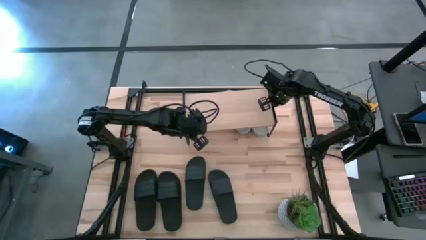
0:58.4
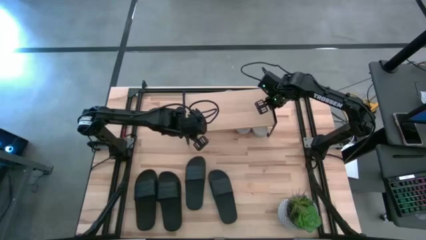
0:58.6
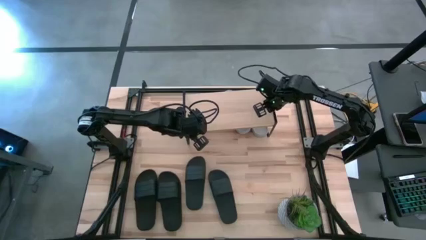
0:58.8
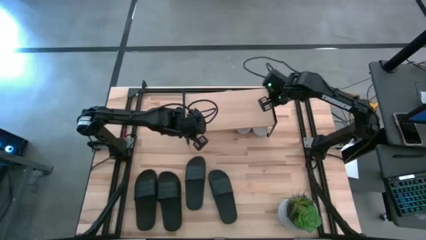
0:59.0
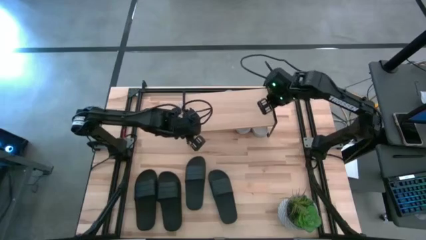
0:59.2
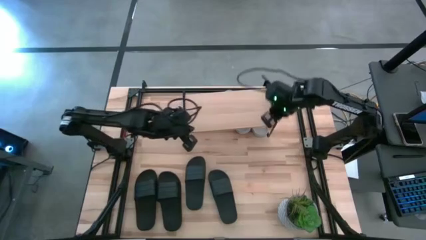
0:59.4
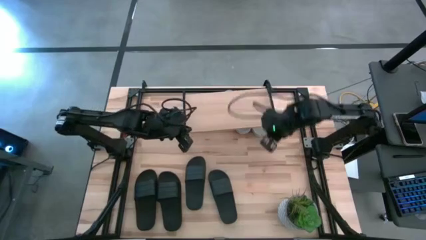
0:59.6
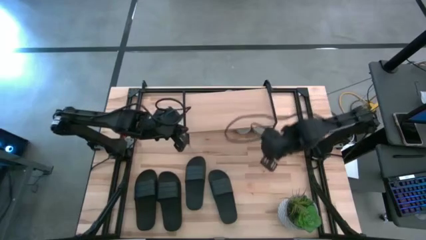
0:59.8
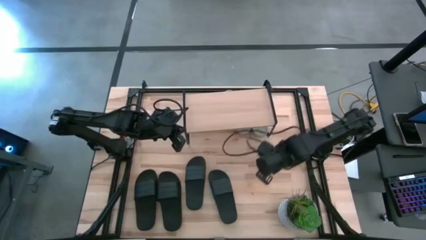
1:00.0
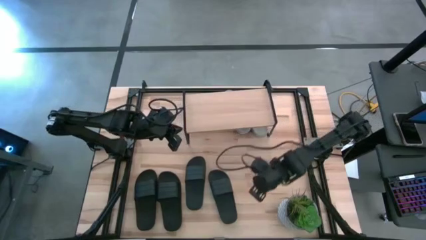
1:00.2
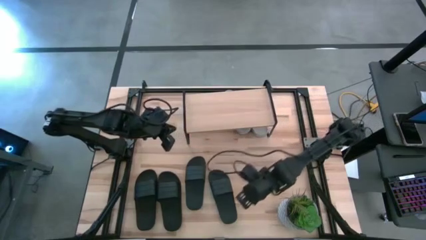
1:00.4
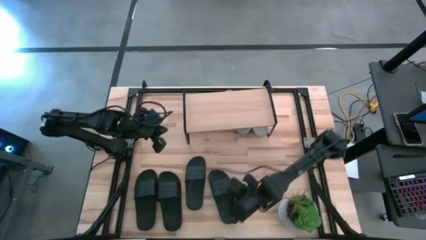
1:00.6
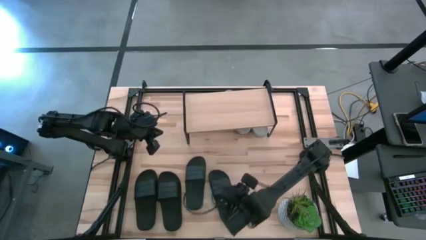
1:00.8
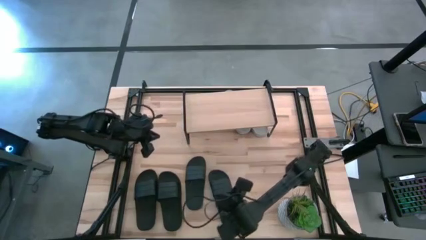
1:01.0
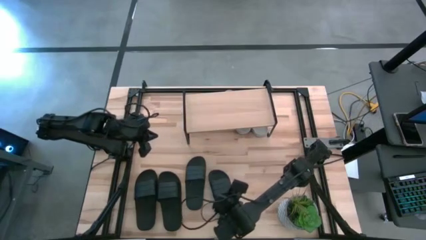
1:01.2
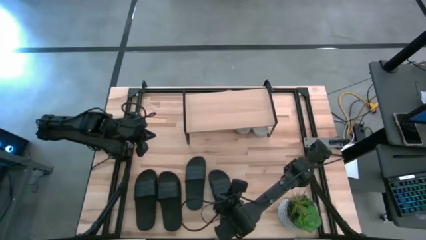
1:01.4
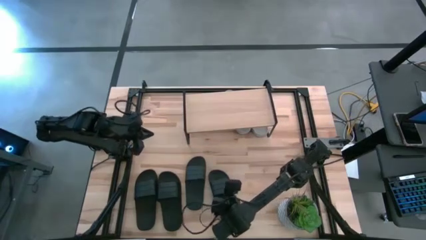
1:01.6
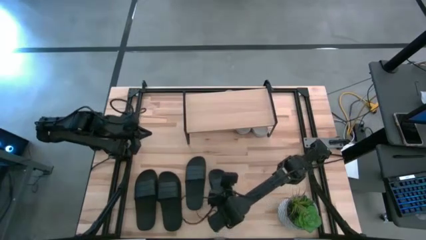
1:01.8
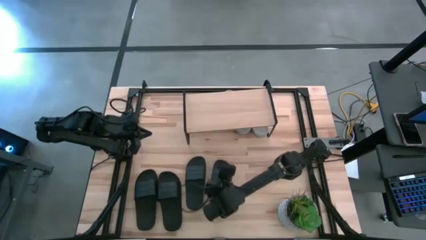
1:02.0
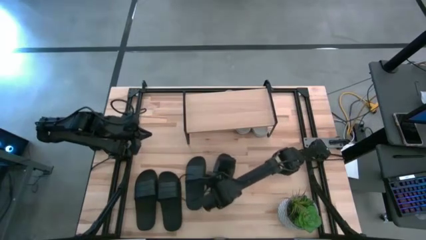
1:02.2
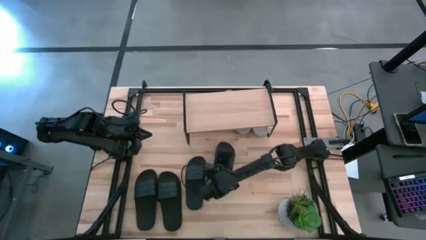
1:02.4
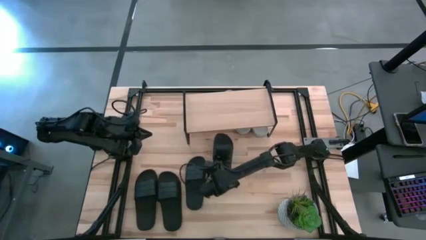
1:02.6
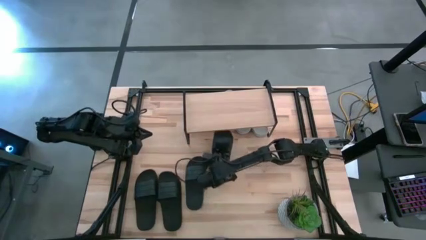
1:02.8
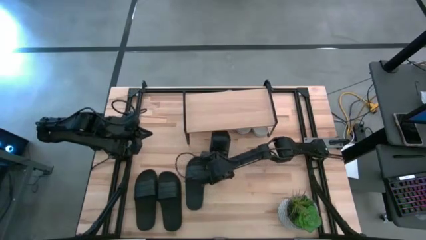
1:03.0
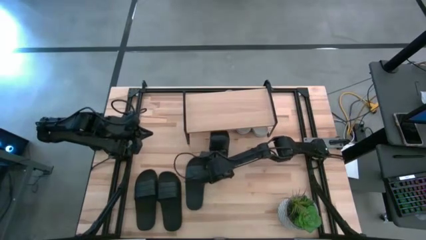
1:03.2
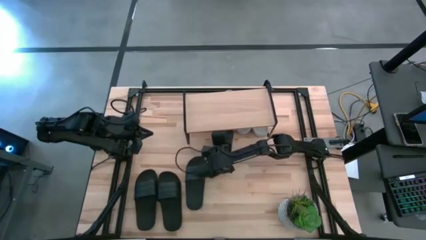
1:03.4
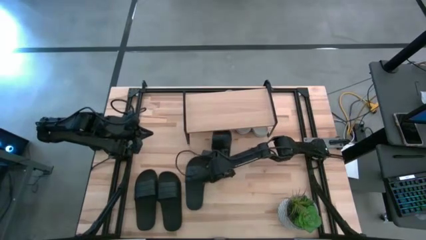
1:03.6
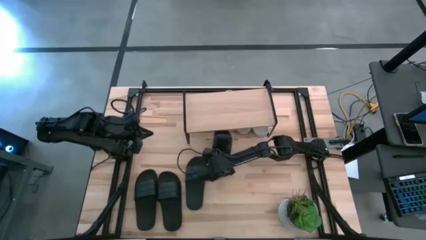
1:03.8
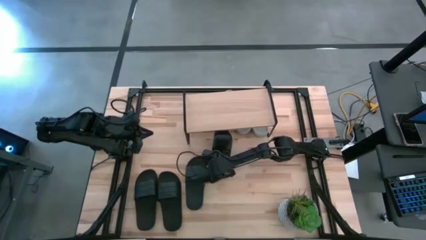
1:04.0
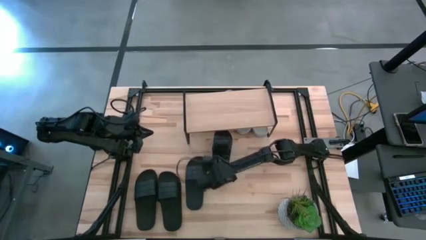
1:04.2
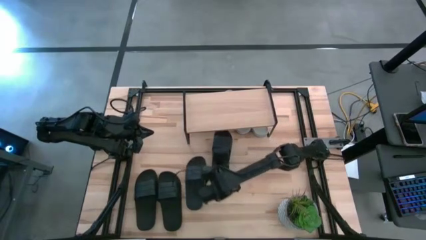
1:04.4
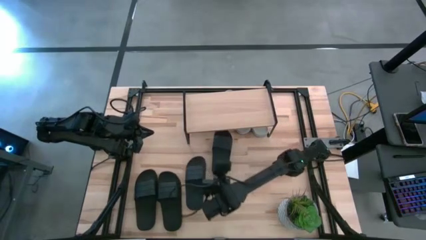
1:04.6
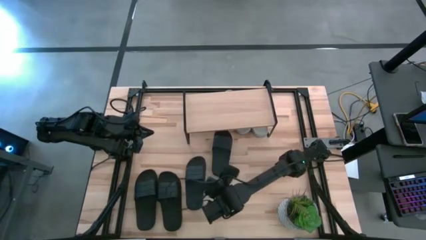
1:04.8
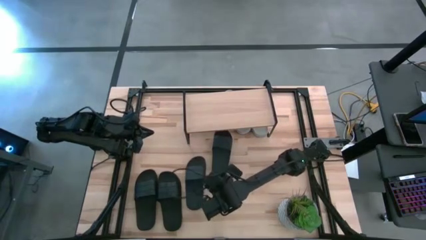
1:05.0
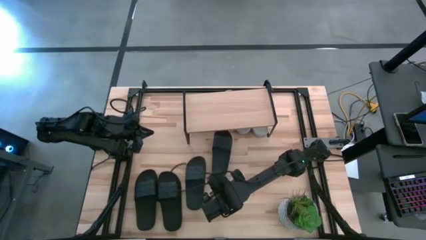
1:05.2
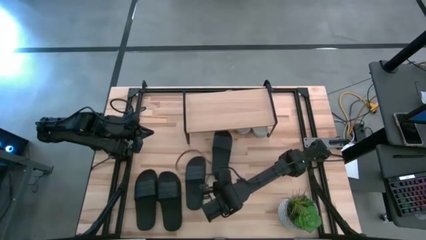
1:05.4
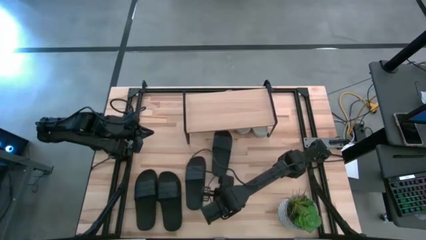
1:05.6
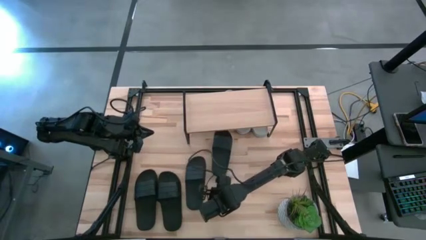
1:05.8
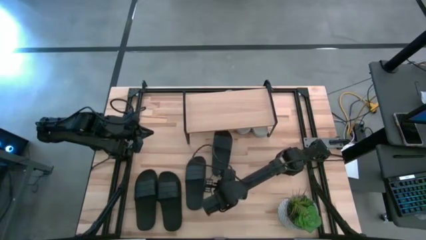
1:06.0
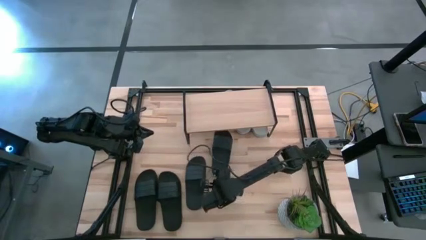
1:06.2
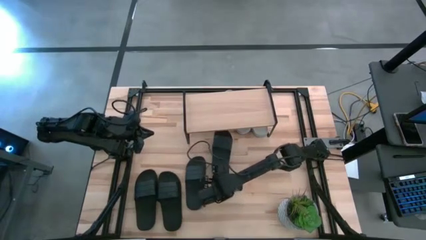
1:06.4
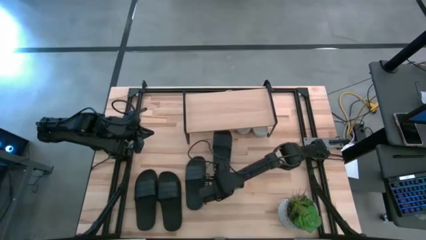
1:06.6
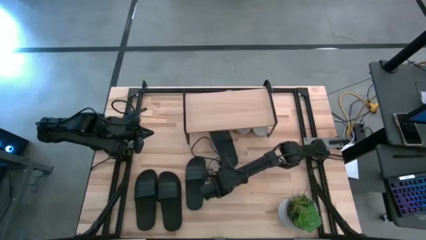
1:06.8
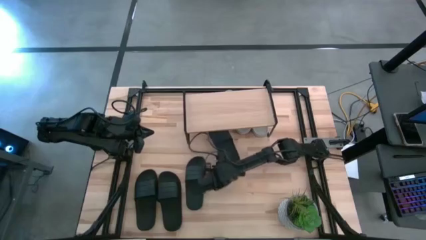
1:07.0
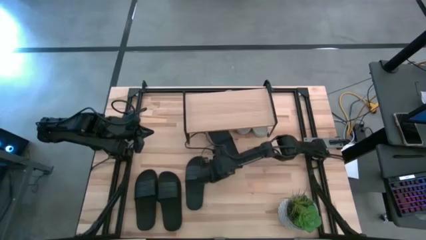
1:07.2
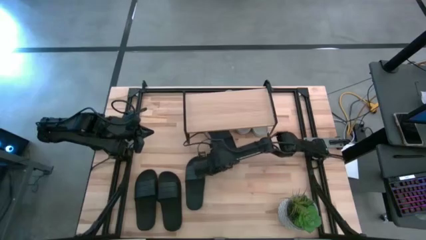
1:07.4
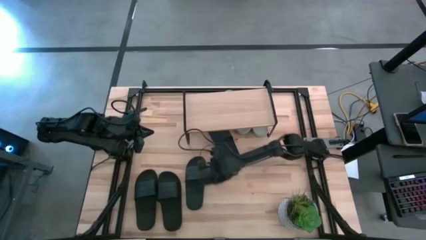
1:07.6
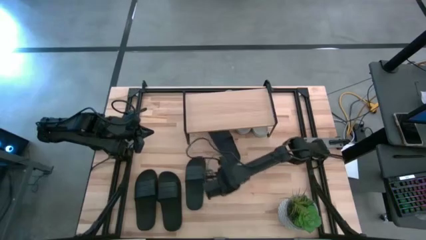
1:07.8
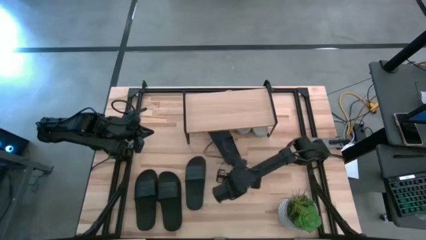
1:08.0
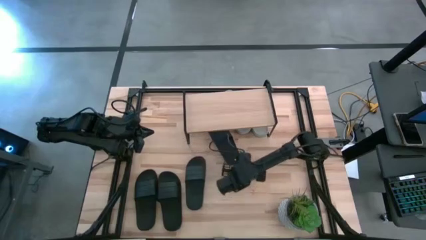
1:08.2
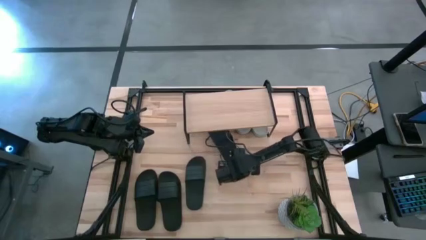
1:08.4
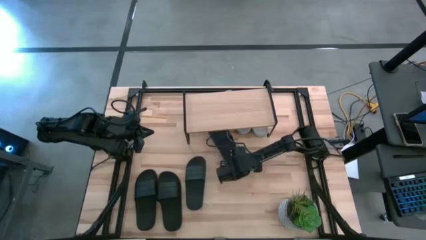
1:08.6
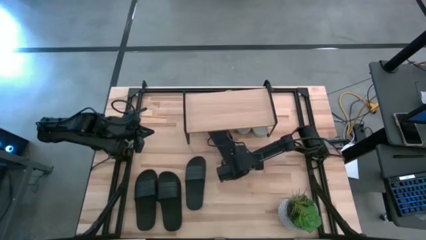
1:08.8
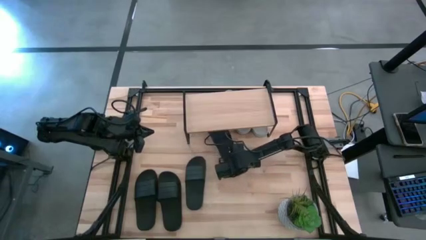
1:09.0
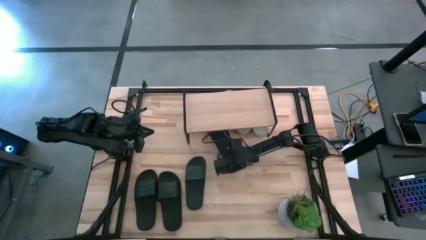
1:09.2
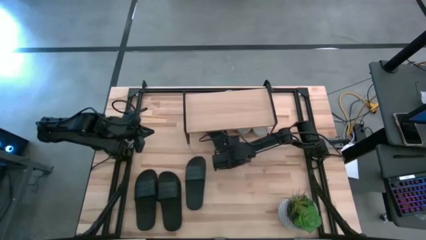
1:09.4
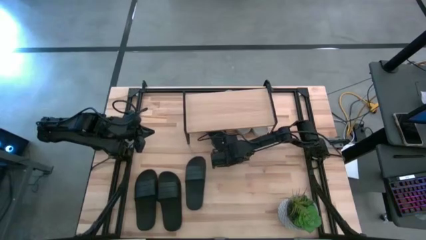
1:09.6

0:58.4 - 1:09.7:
Task: Pick and place slides into the shelf
Put the black slide under the shelf

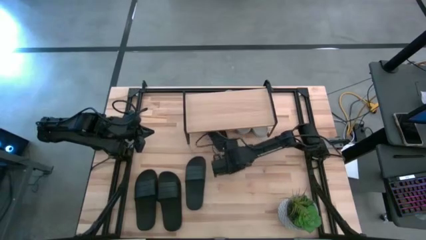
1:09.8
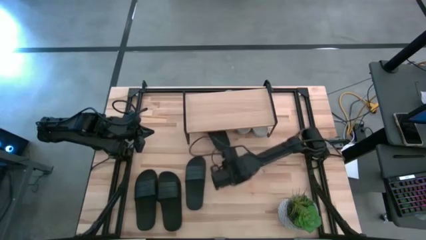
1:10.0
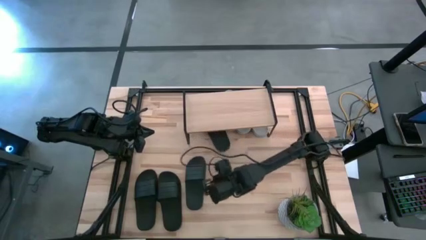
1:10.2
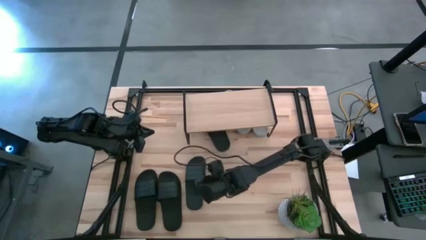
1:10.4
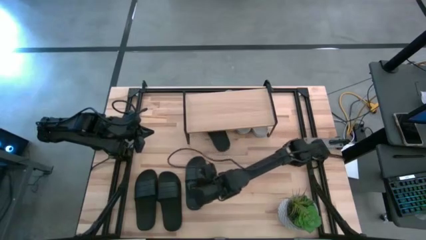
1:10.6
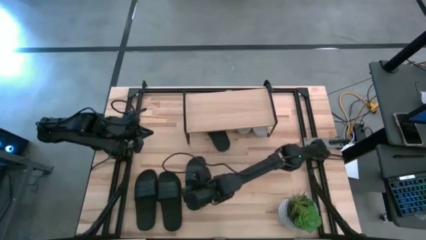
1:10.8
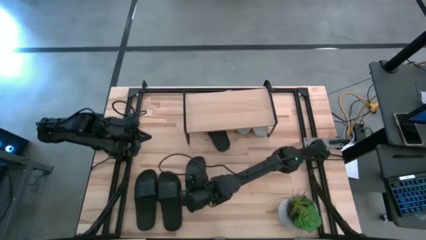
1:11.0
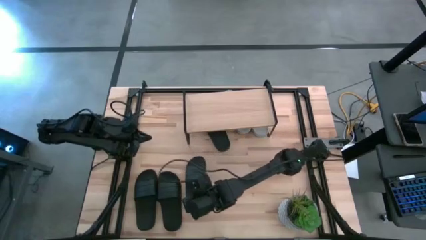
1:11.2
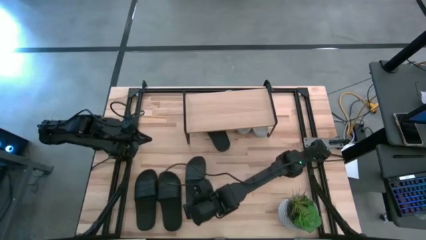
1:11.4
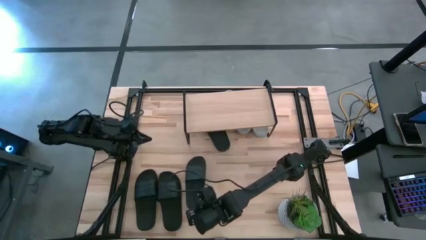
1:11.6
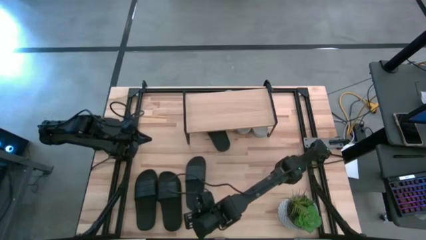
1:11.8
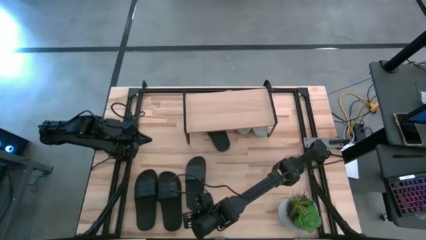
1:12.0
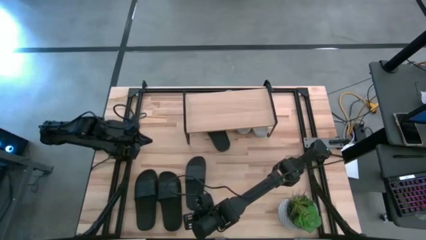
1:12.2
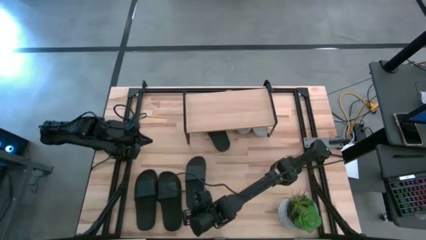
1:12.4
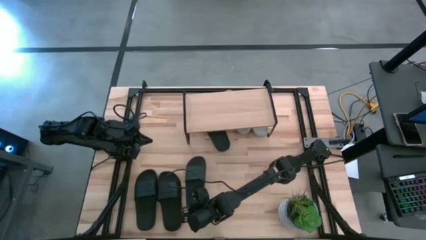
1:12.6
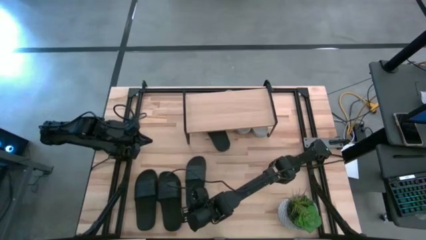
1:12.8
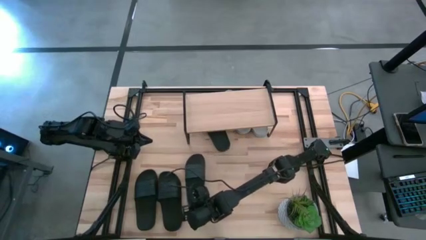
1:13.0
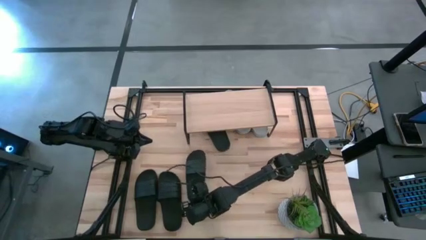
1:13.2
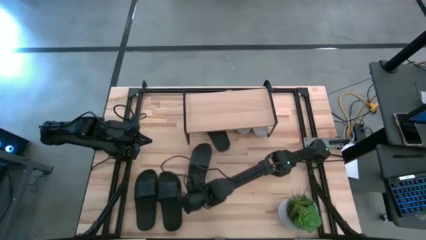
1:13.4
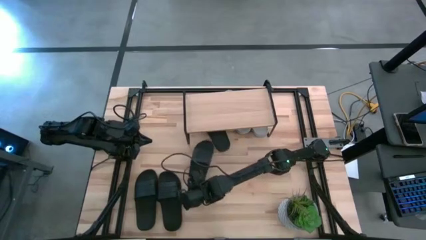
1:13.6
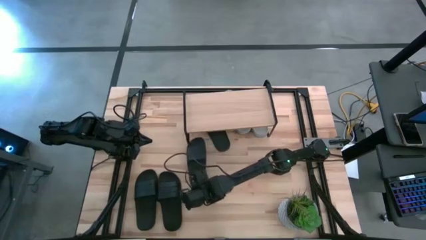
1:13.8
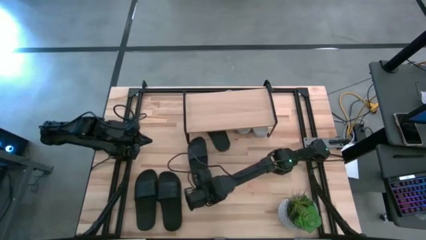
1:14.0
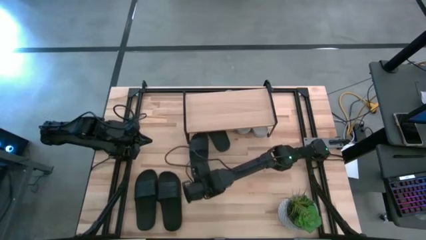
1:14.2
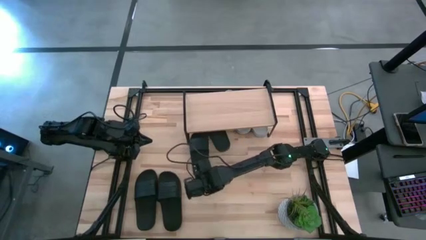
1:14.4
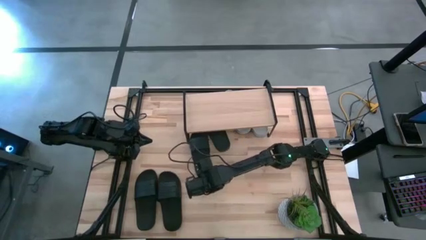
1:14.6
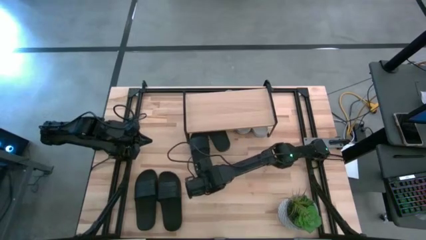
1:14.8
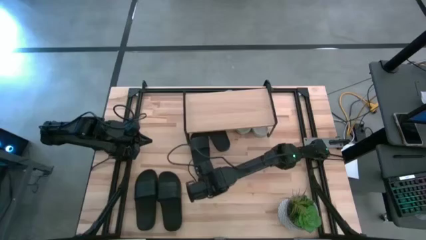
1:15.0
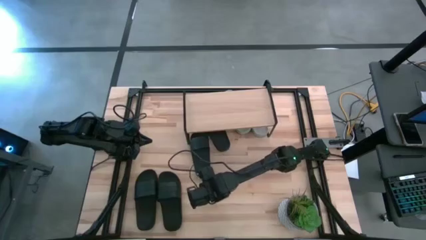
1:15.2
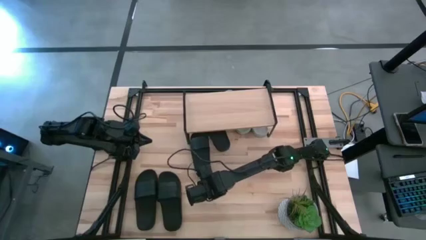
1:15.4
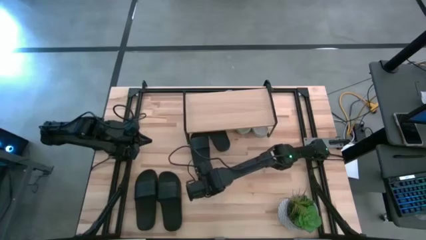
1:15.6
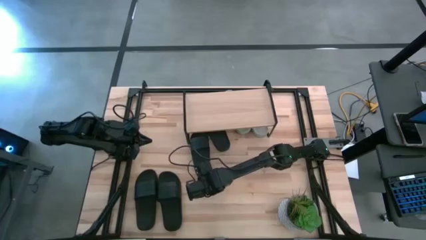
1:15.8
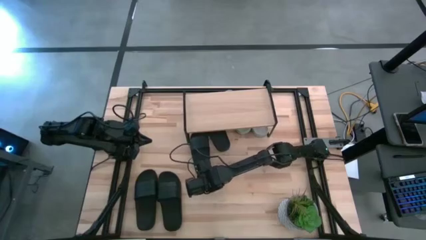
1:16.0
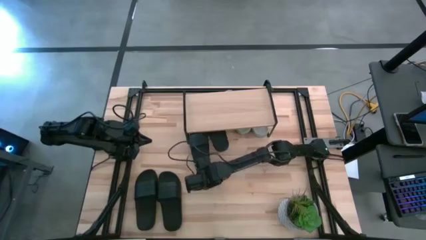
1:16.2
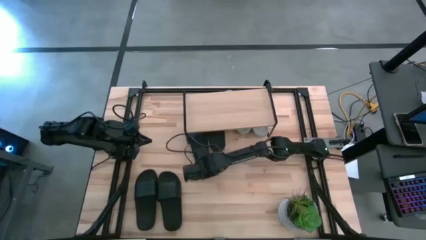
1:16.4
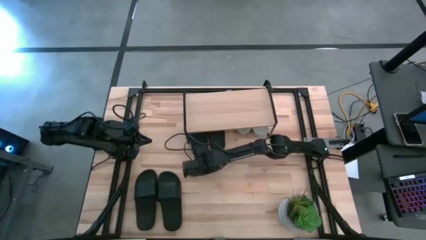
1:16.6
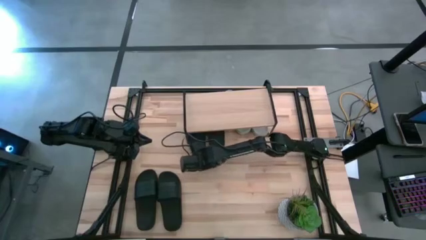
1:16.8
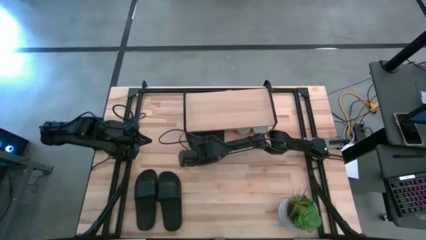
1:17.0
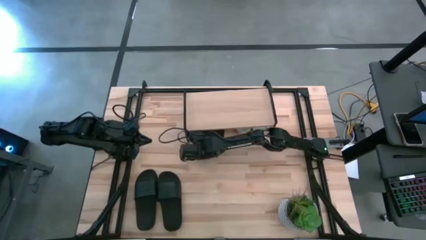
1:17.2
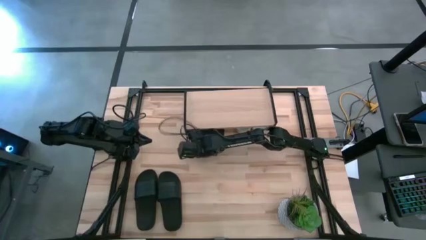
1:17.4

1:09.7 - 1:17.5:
Move the black slide under the shelf
